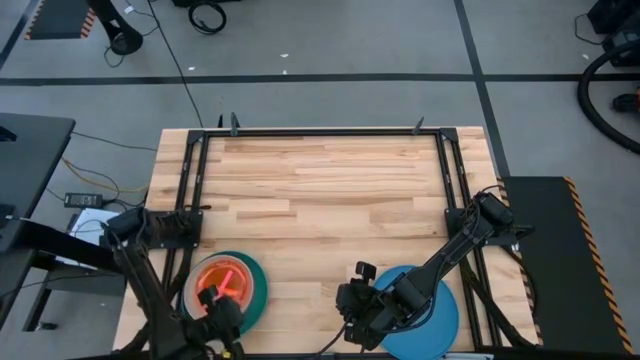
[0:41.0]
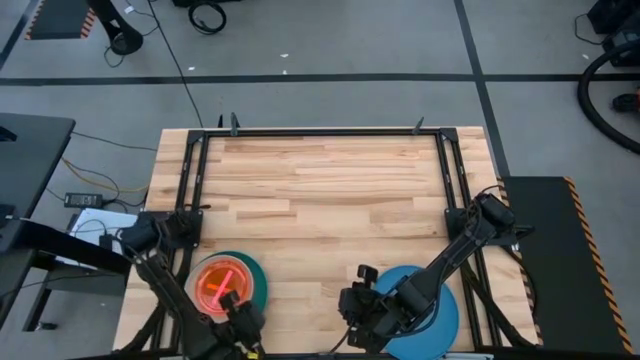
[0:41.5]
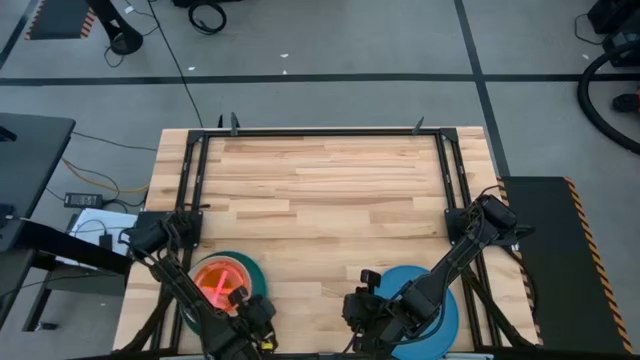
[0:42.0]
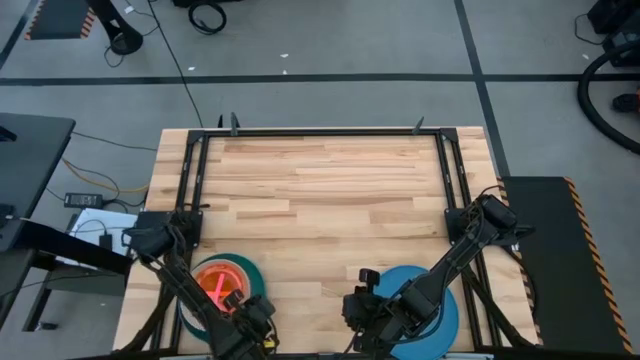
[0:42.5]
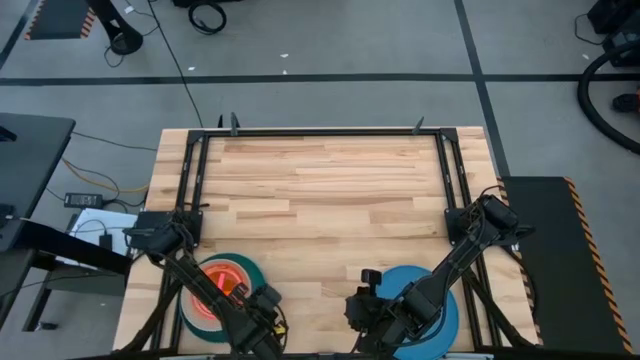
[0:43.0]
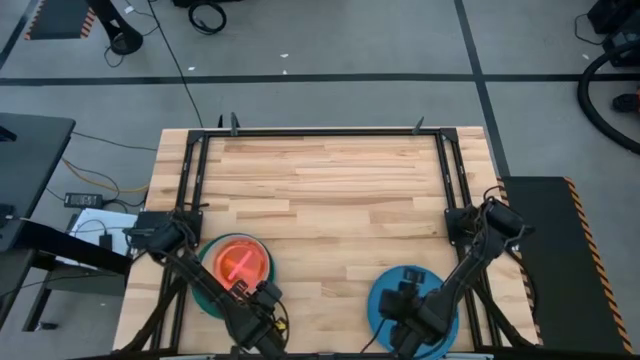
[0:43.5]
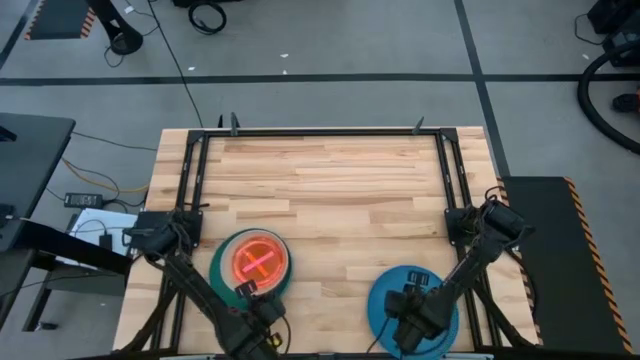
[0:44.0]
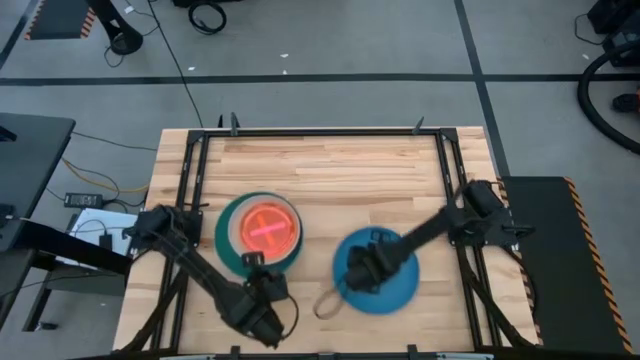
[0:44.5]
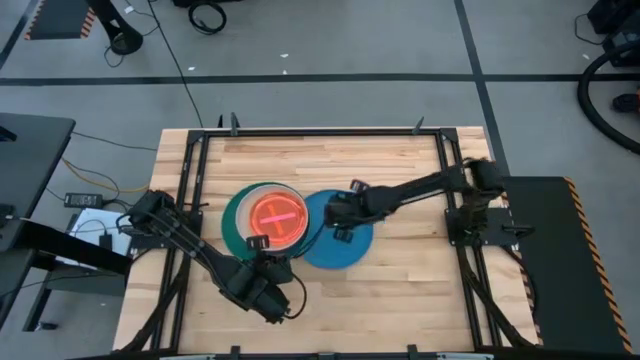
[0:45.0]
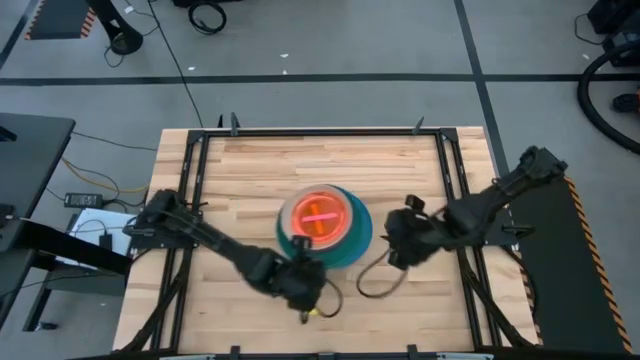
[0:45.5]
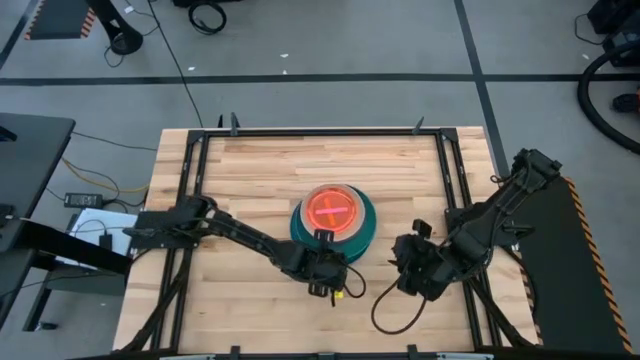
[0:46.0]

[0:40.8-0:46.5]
Task: Stack plastic plates
Stack the stacked plates on top of the blue plate

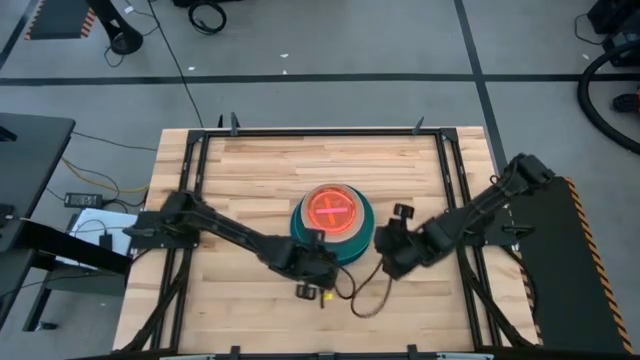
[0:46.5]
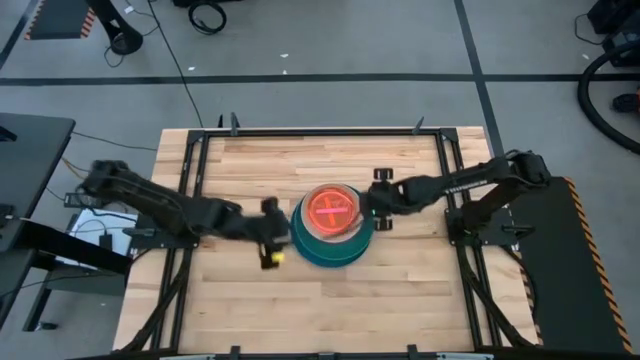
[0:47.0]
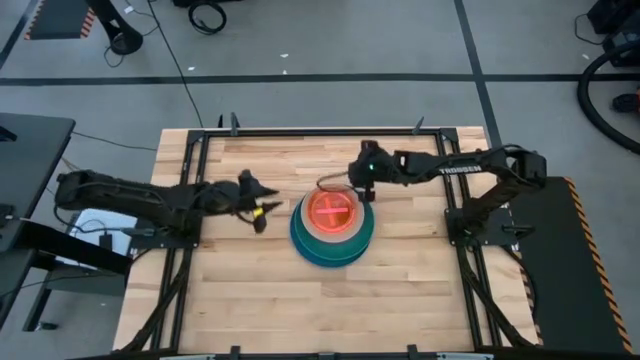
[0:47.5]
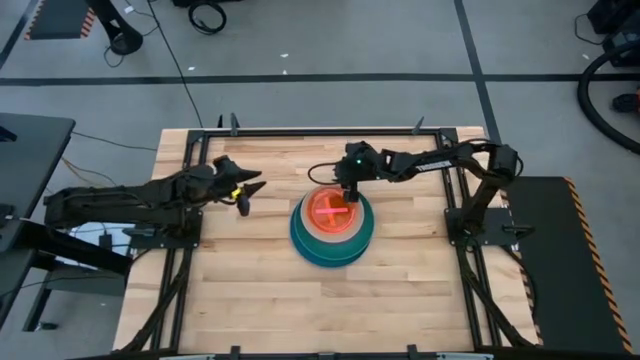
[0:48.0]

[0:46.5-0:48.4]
Adjust the plates

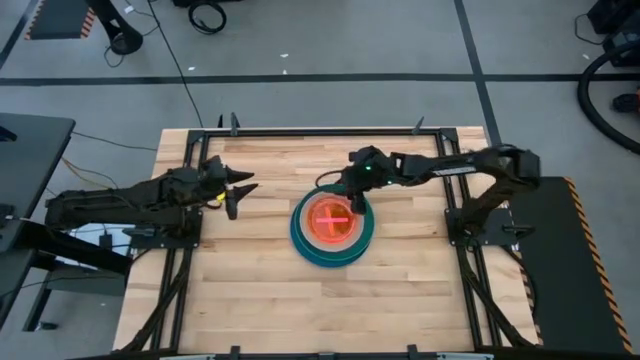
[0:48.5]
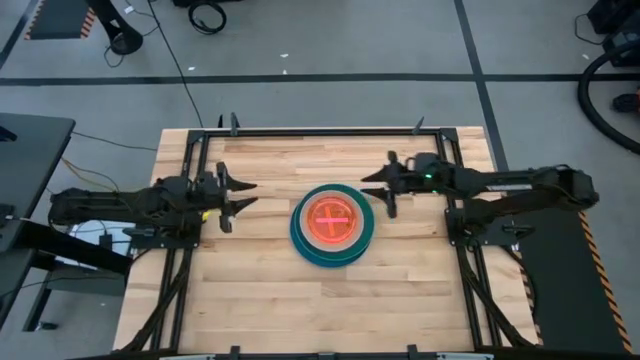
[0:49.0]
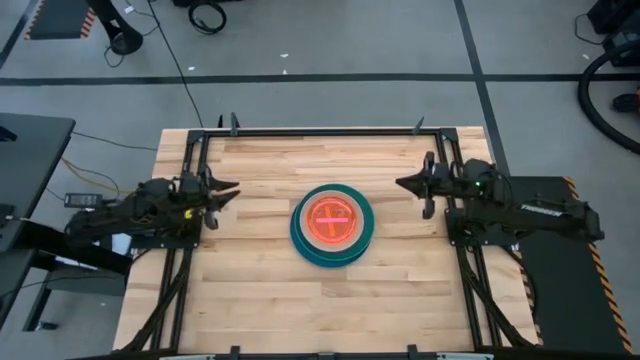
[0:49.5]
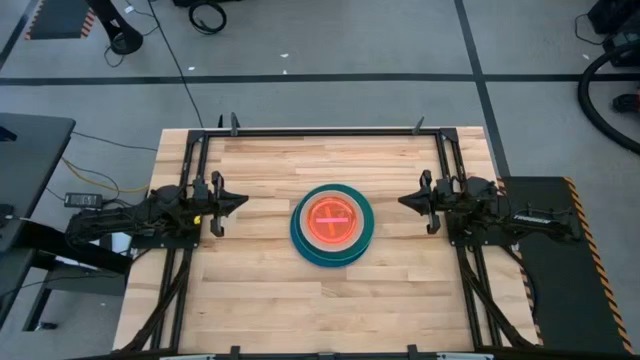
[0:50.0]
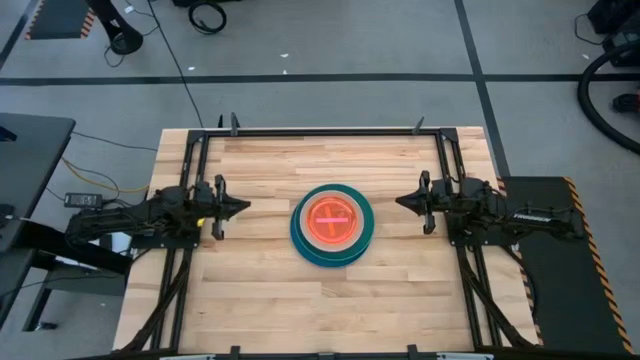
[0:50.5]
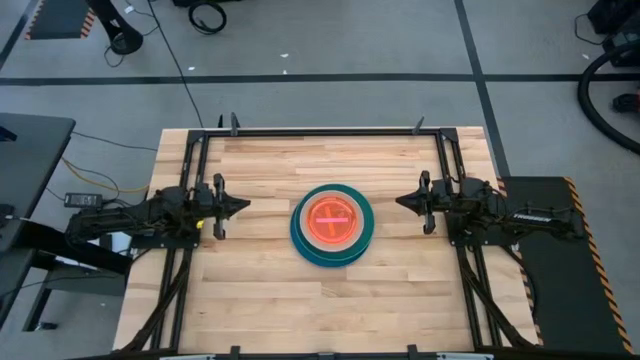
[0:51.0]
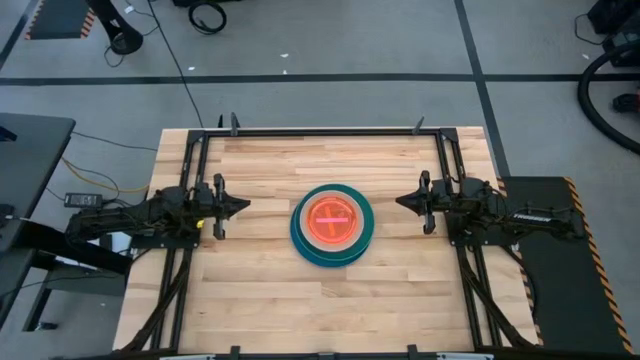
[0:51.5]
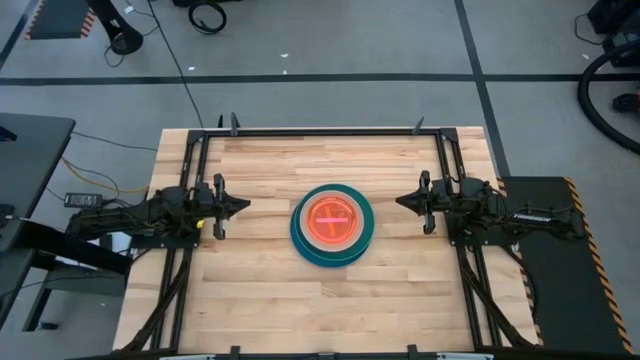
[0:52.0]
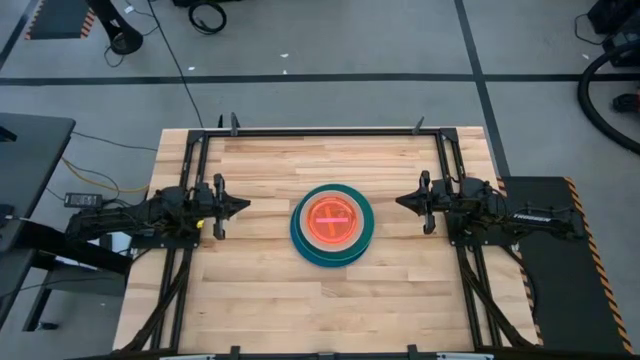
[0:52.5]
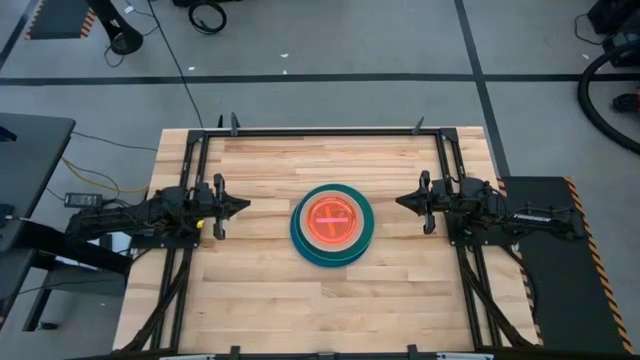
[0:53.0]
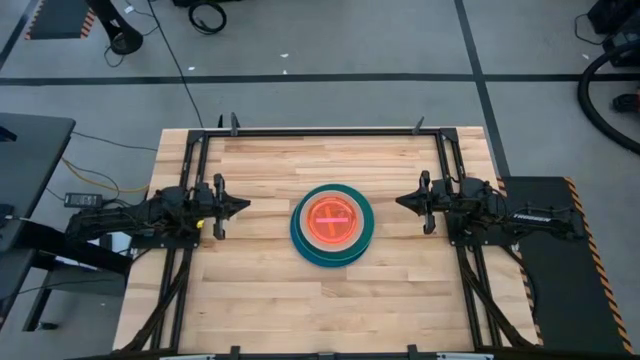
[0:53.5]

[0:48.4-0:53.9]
Return to Home Position

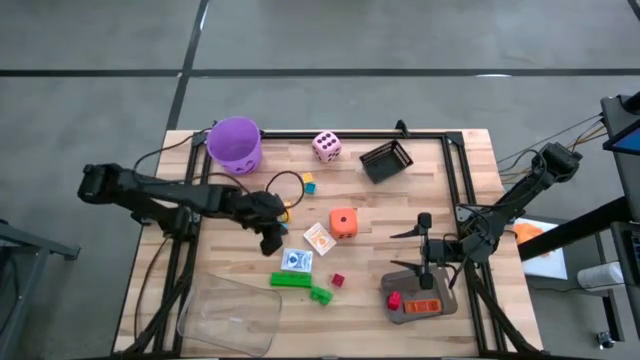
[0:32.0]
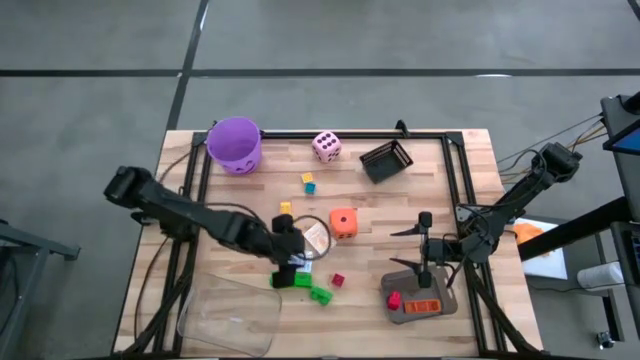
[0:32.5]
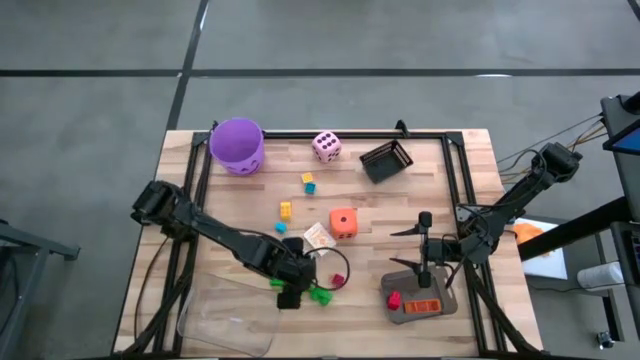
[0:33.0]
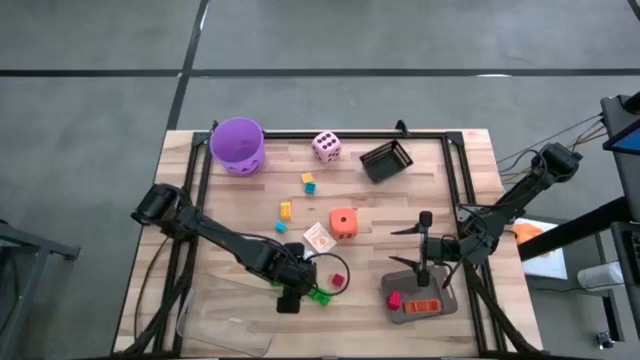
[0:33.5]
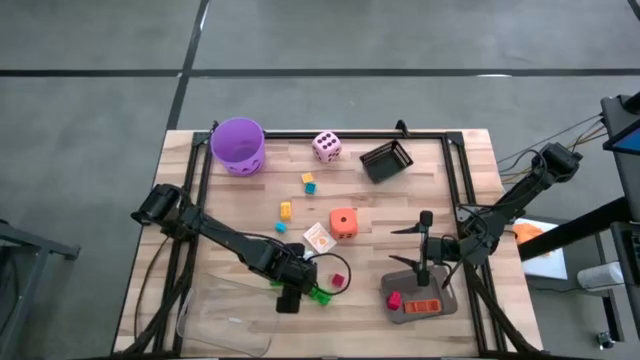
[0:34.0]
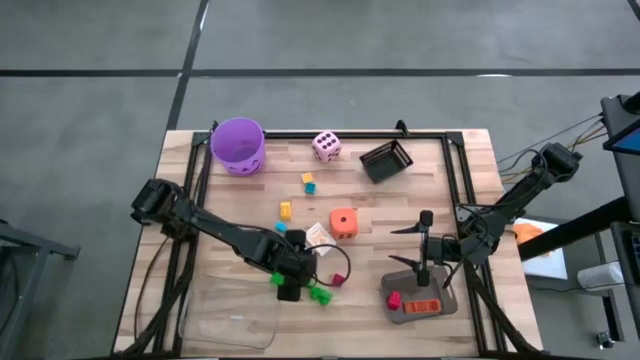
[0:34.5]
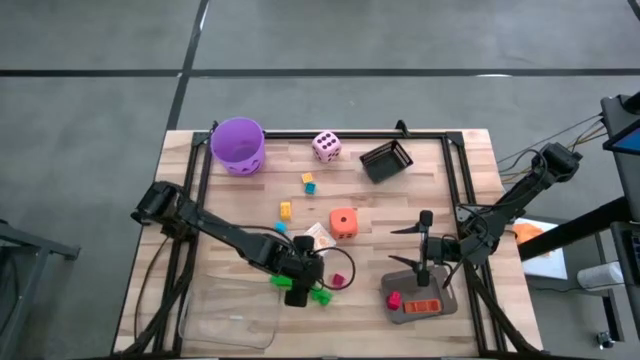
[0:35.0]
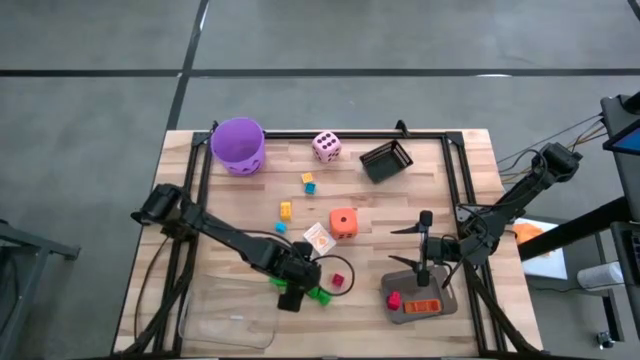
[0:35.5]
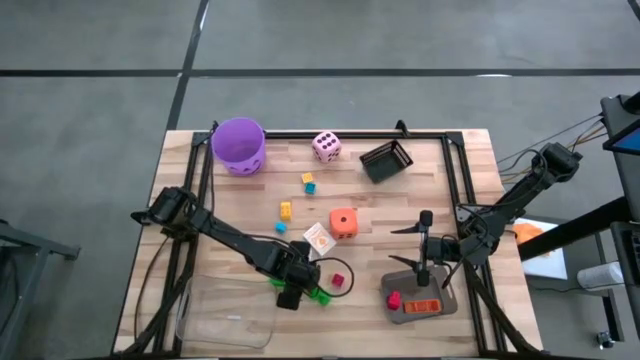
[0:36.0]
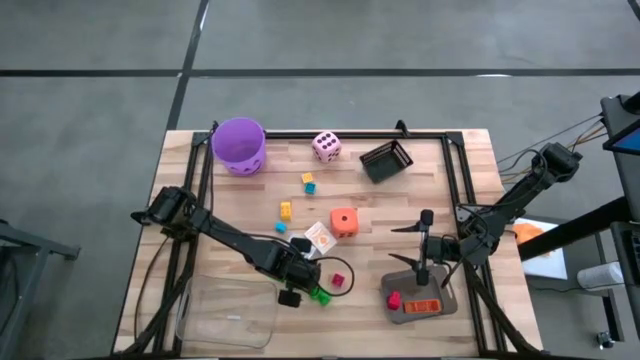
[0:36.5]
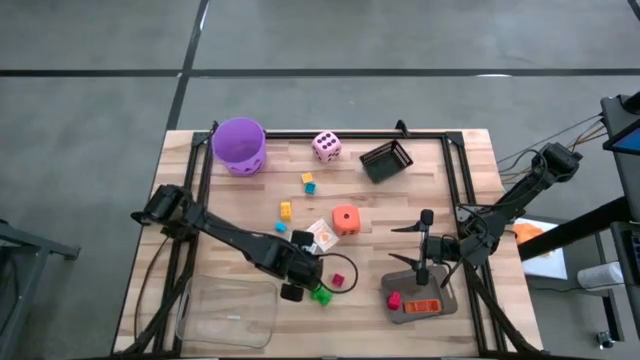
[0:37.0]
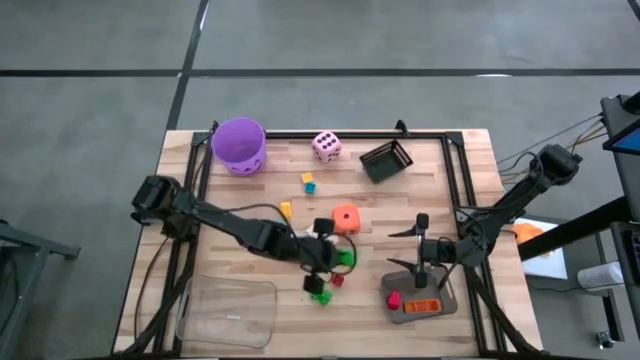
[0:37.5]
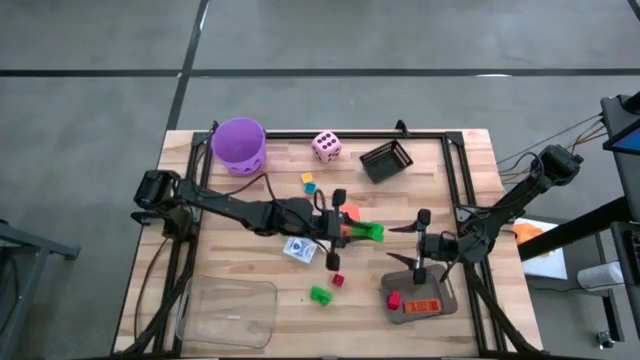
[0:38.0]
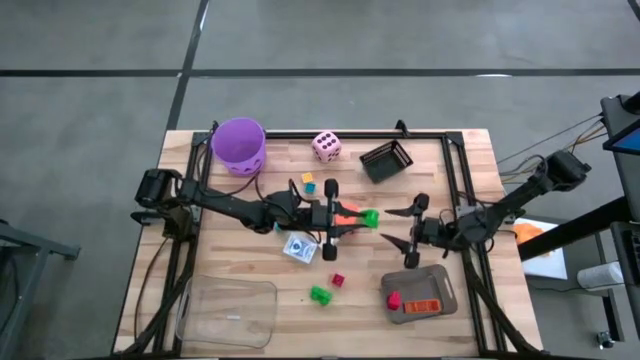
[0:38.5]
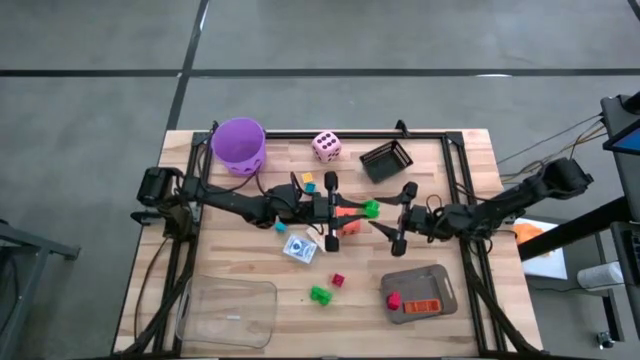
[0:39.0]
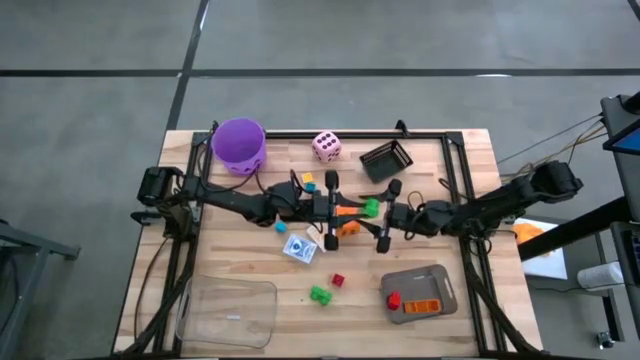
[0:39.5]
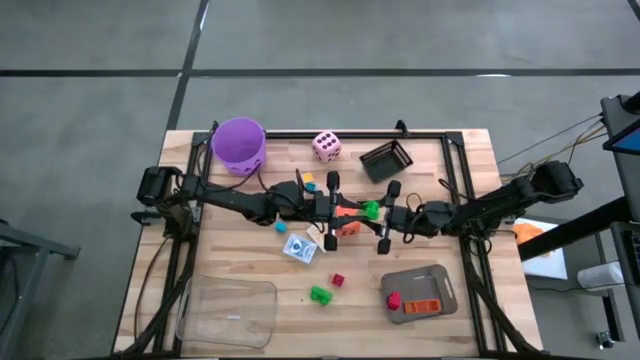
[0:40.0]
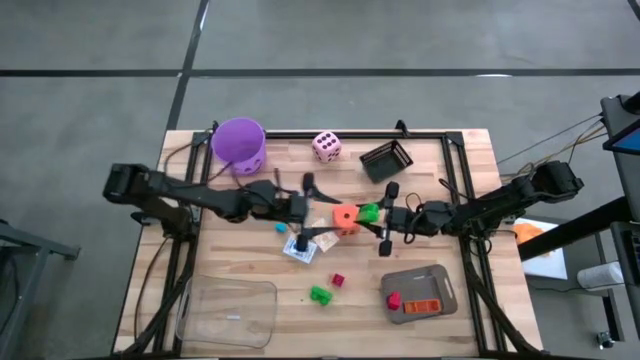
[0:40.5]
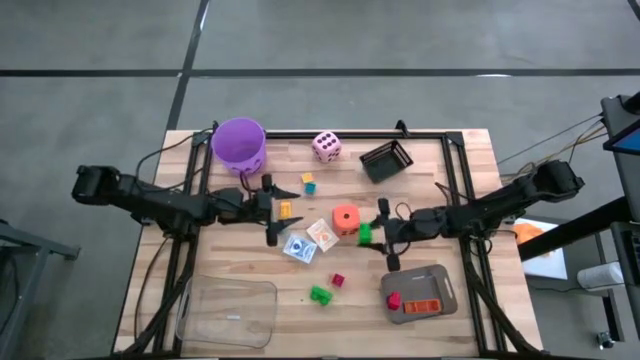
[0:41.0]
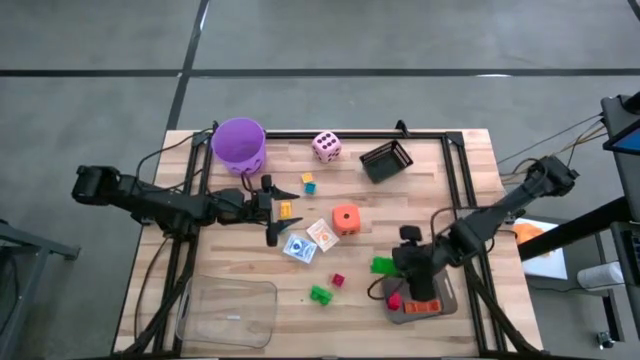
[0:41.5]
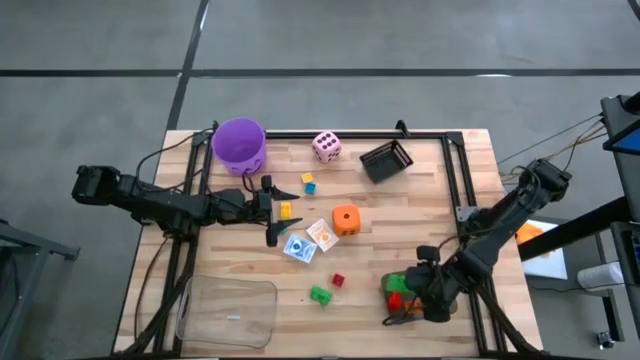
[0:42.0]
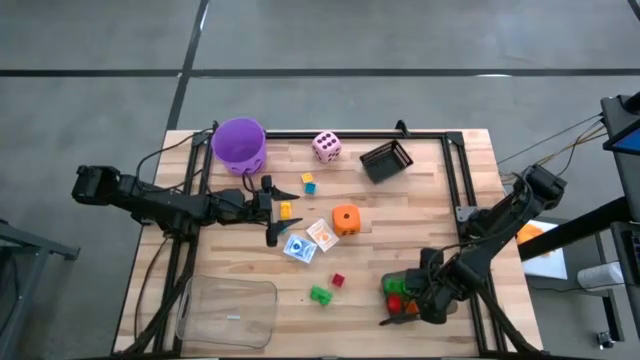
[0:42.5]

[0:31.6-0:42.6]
Task: Pick & Place Toys
Put the green game piece into the black bin
